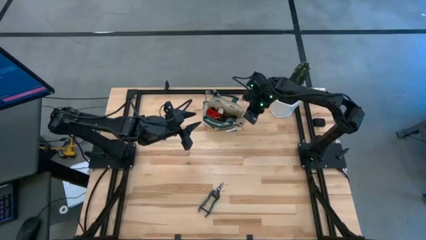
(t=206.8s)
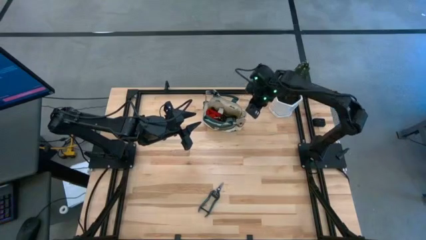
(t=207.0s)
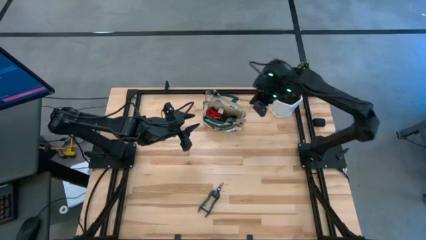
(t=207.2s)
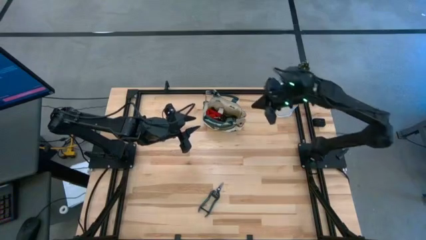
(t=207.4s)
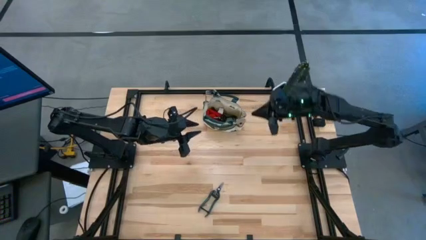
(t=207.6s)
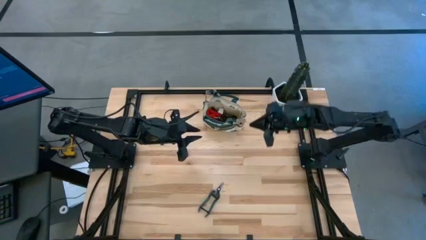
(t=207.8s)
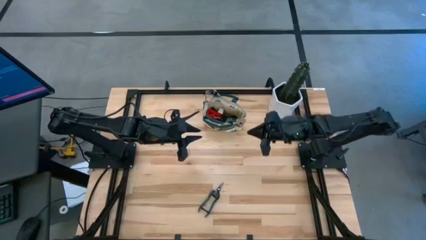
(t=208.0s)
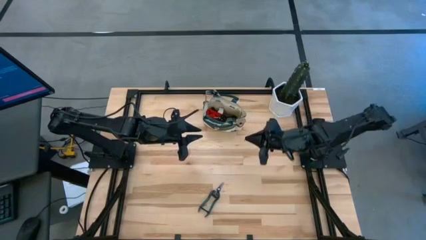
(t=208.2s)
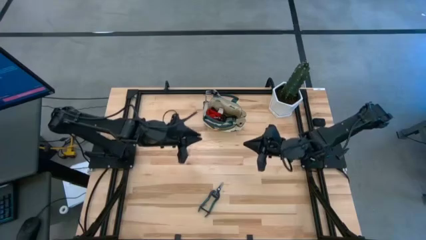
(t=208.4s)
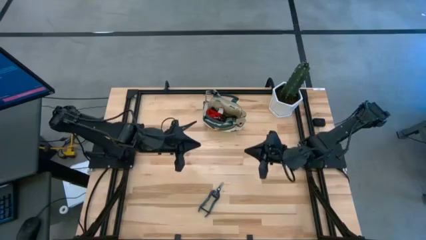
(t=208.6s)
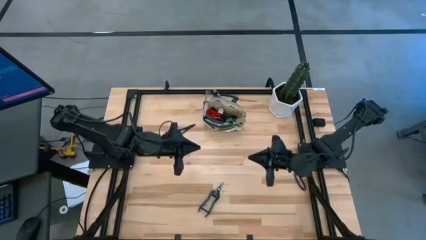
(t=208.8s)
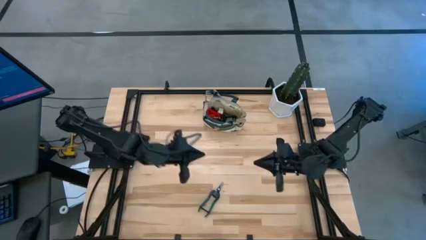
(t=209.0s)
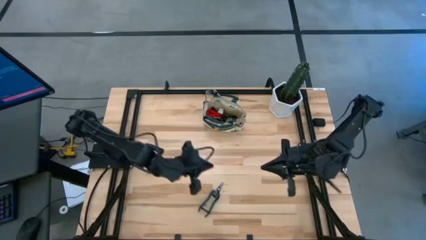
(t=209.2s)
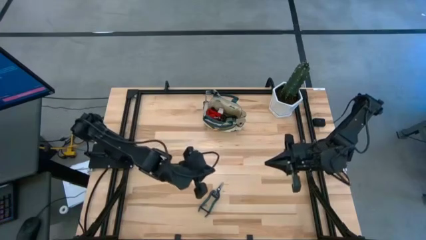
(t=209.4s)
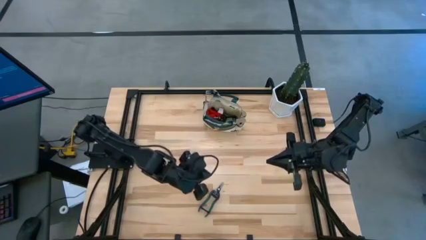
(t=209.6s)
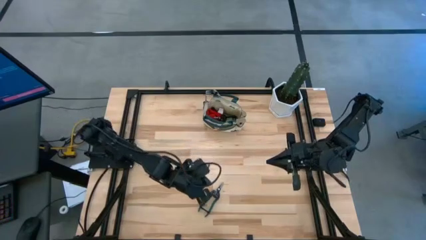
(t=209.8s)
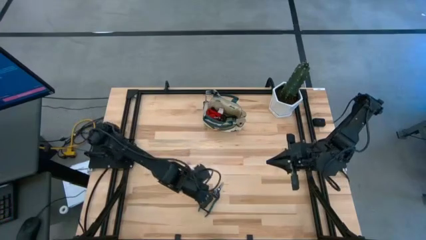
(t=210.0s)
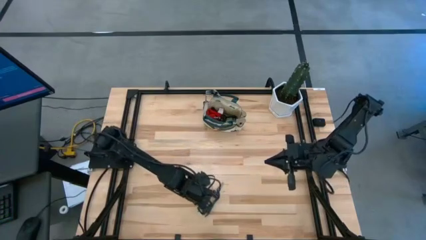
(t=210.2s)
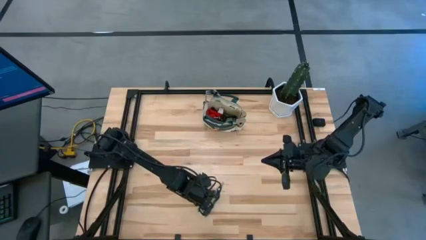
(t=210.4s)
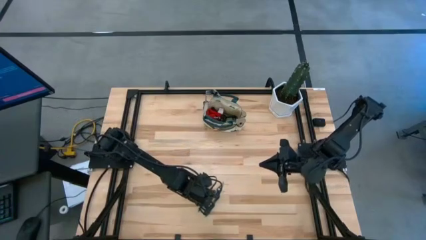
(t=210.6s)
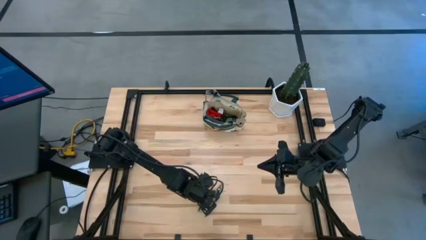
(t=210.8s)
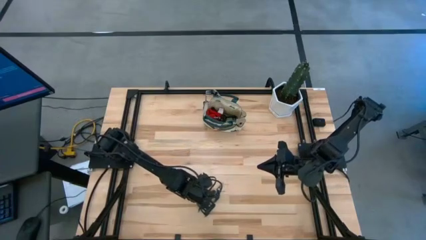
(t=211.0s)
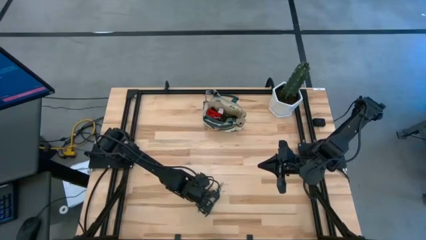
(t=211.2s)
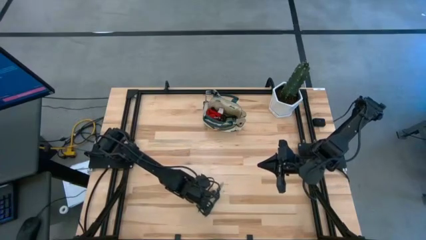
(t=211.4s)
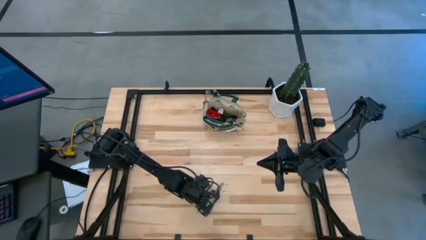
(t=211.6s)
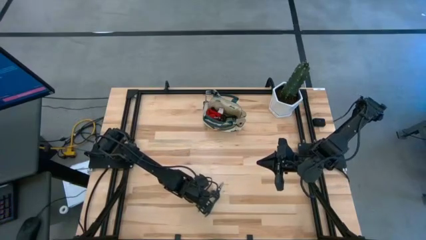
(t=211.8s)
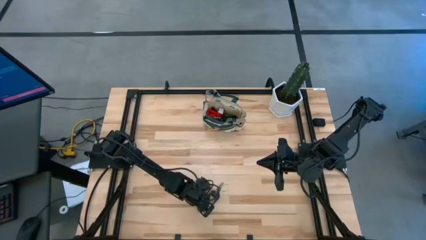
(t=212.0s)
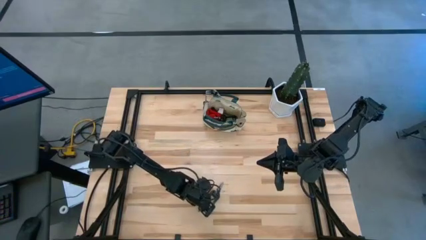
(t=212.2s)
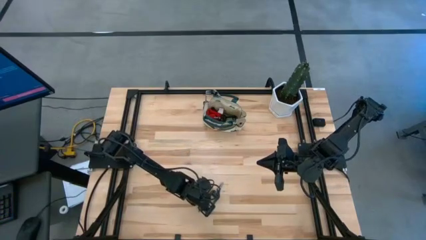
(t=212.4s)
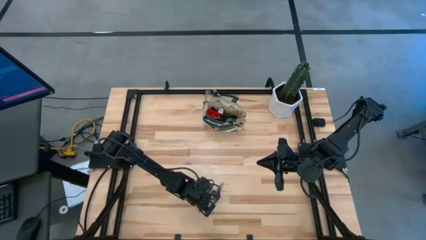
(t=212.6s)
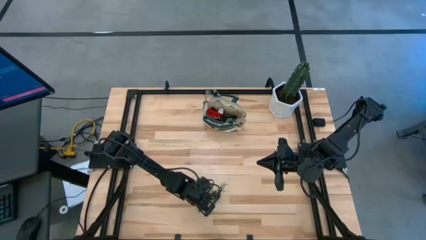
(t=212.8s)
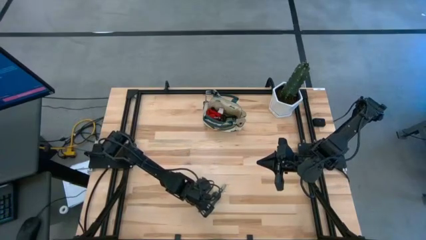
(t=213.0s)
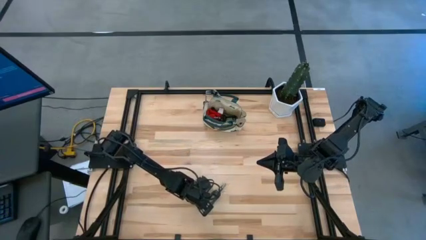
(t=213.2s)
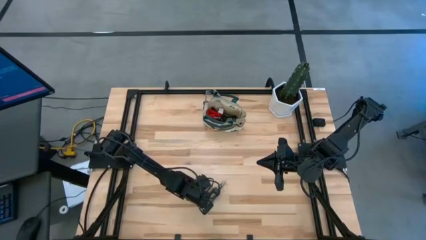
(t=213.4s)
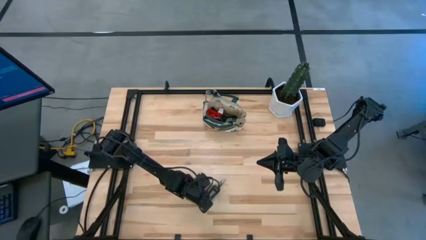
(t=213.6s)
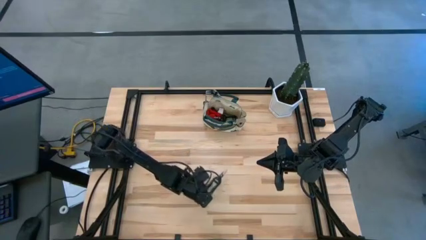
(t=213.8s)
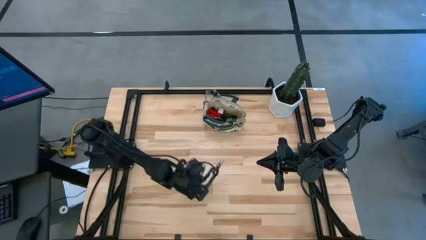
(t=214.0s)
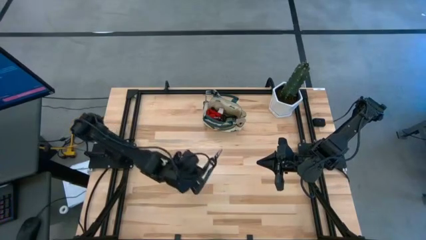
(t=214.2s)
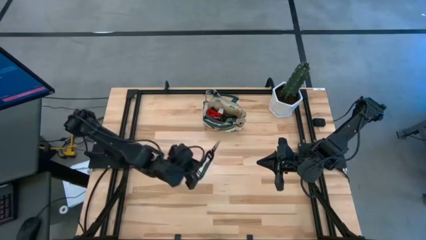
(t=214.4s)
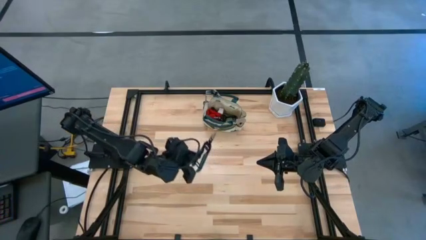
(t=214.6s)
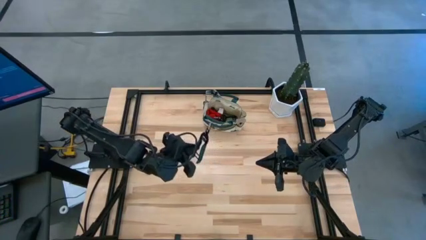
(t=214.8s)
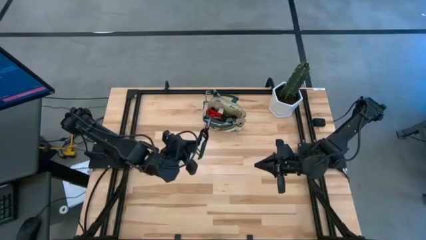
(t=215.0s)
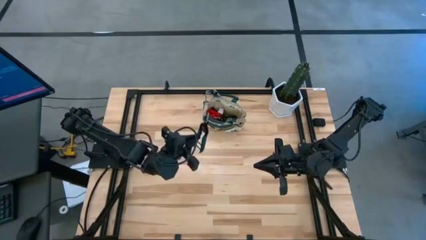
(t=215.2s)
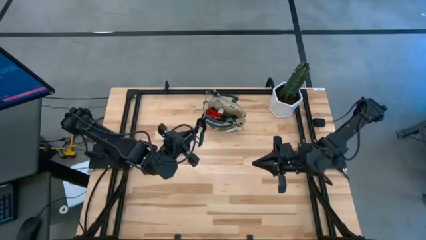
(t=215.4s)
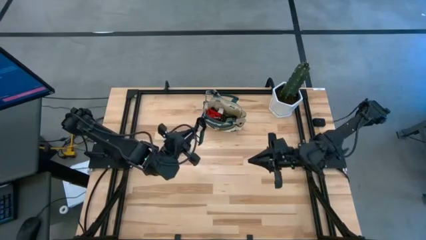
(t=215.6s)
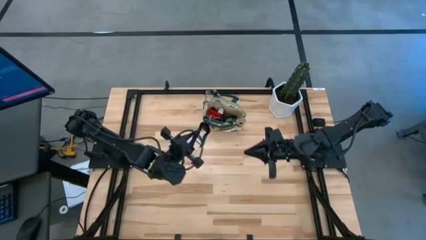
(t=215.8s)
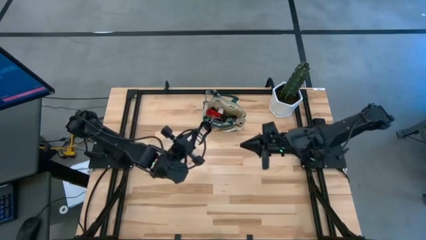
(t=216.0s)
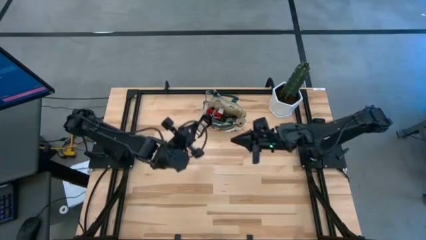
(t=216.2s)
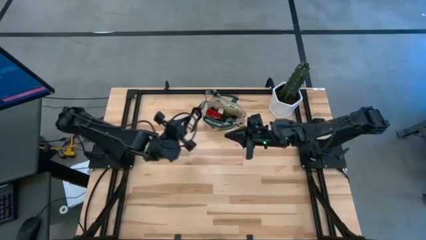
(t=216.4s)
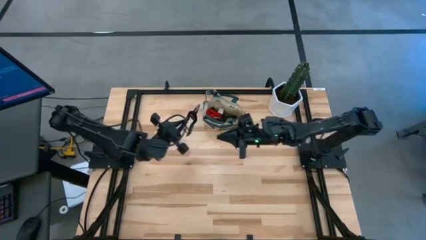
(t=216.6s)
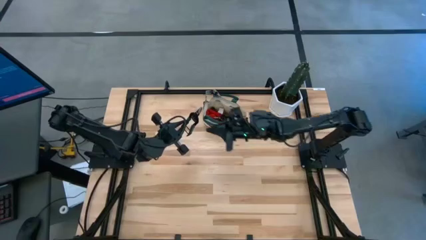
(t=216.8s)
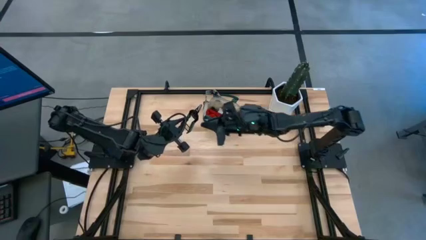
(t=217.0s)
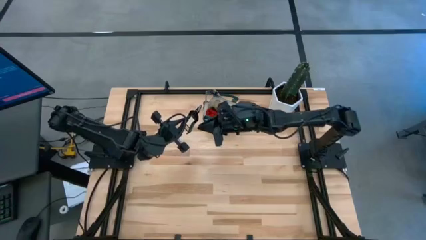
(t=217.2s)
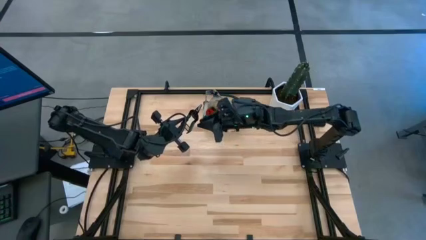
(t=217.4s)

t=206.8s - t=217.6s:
Task: Pick & Place Garden tools in Gardening bag
Put the green shears into the brown gardening bag

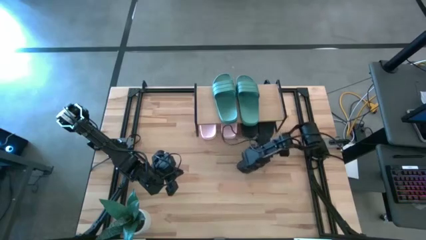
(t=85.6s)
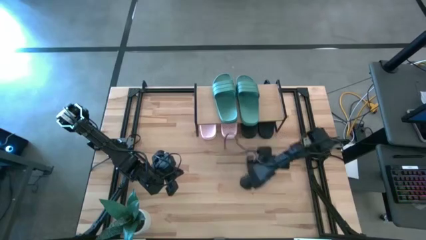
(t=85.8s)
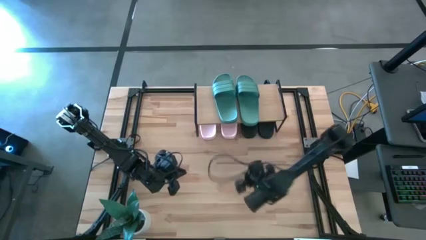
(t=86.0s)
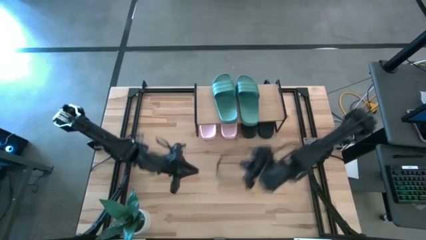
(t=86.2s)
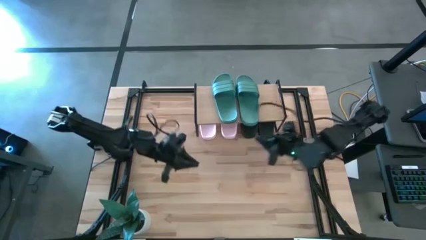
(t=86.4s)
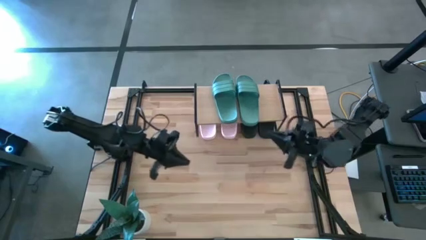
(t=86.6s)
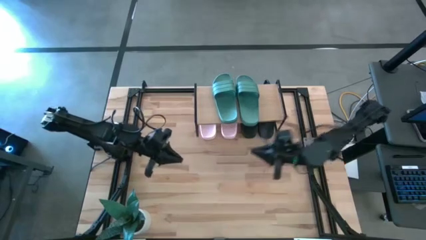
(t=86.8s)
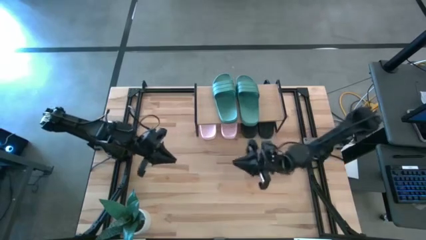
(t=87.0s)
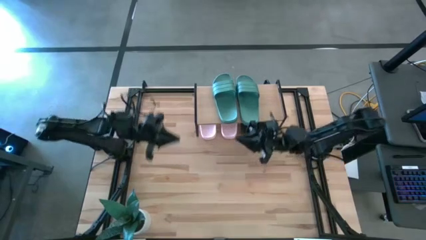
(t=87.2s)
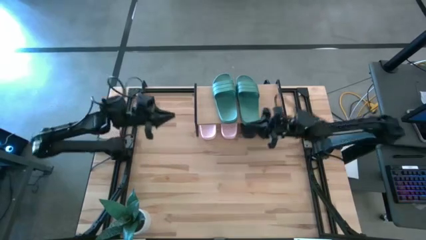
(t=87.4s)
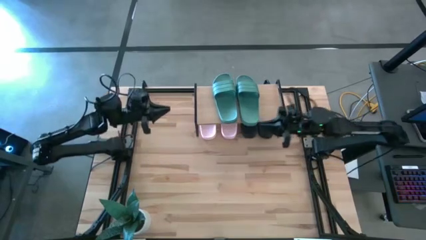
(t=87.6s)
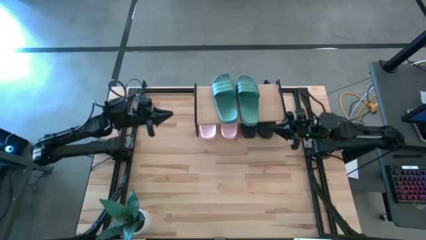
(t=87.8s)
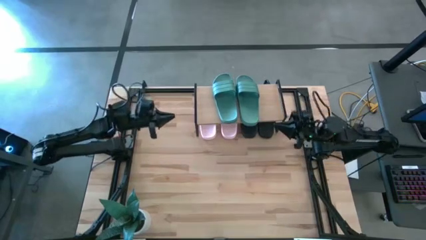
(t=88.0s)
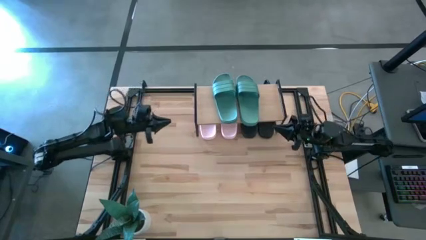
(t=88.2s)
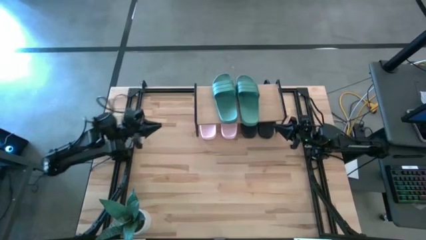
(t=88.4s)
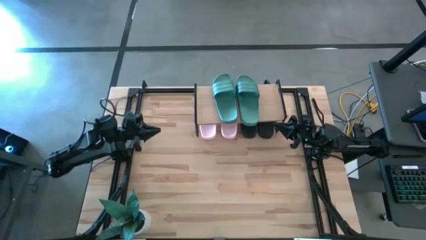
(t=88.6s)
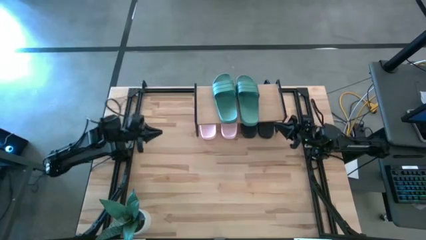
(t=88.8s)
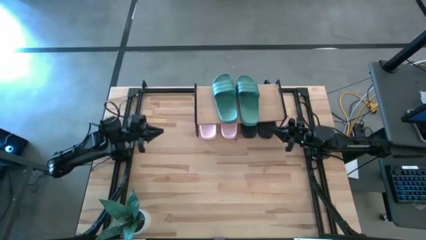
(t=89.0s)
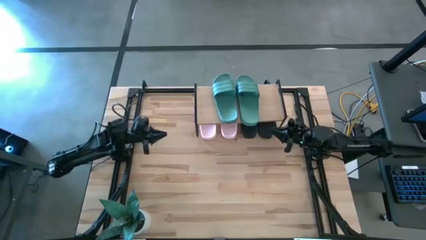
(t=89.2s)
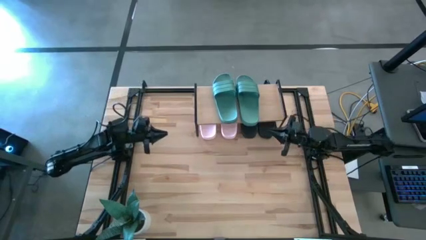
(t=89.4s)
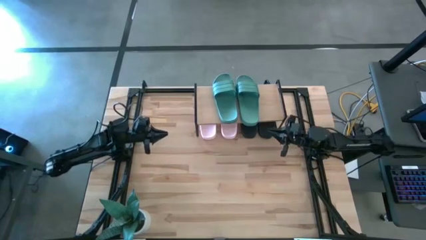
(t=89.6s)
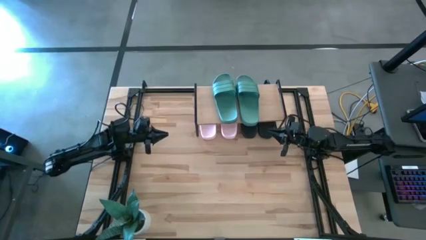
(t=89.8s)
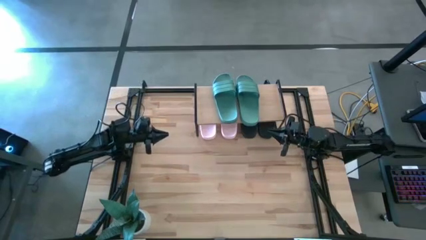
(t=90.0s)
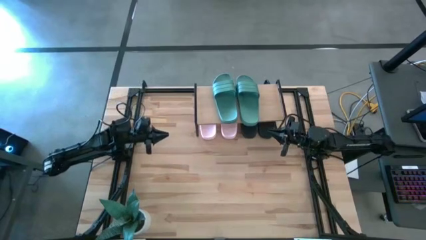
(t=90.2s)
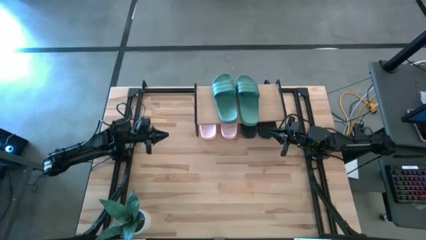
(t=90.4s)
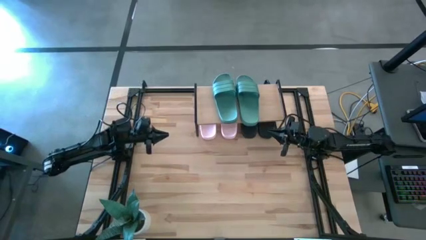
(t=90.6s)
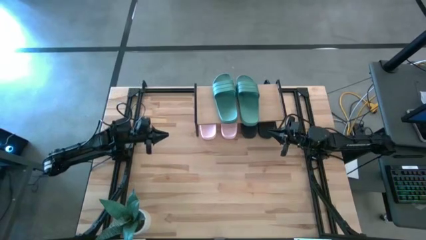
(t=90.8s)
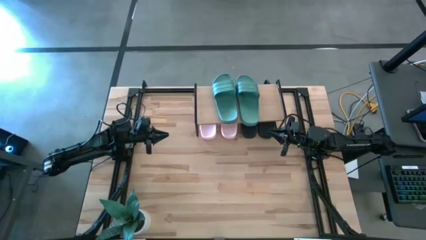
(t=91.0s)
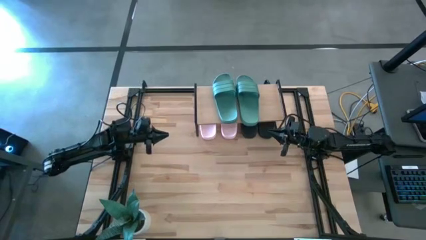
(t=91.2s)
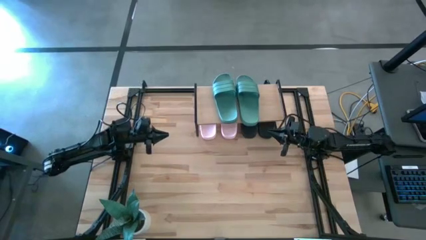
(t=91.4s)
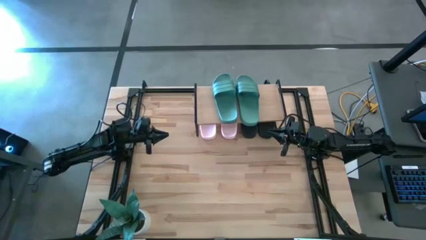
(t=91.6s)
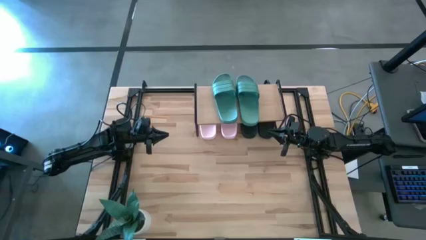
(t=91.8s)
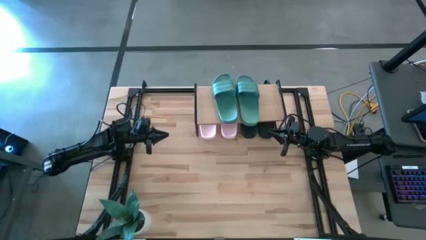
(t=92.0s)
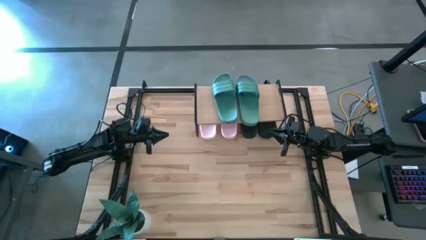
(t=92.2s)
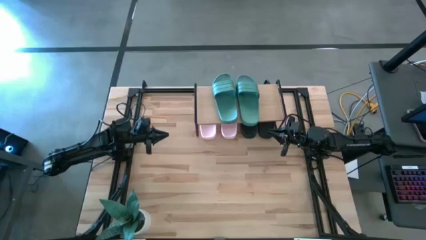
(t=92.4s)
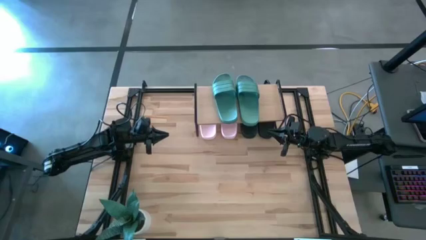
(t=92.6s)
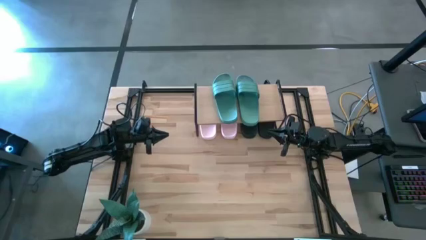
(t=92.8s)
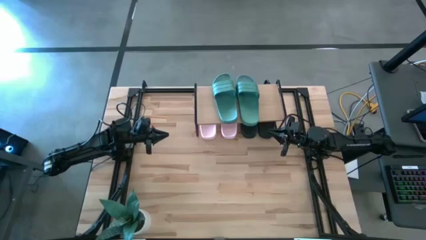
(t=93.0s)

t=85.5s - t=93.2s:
Task: Pick and place slides into the shelf
Return to Home Position
